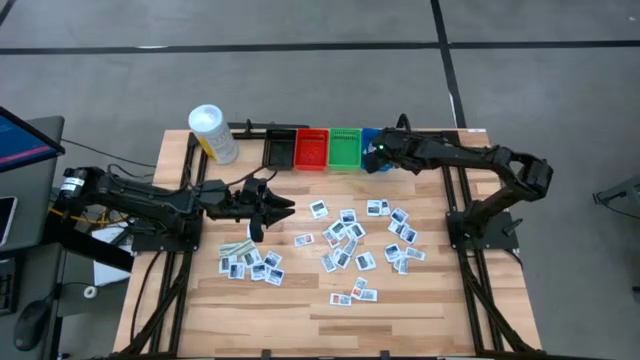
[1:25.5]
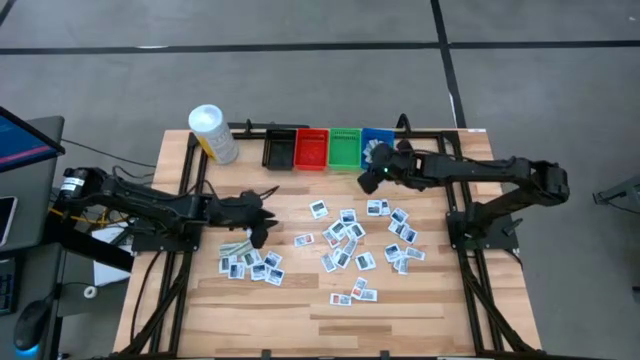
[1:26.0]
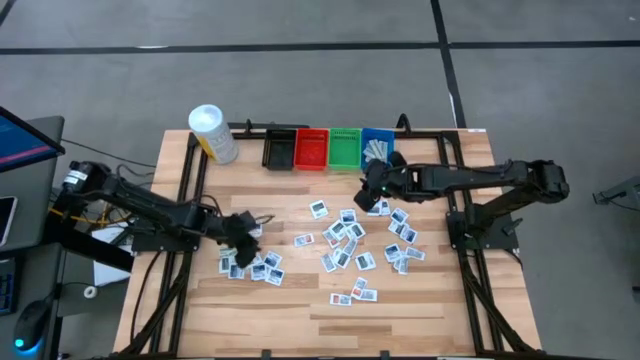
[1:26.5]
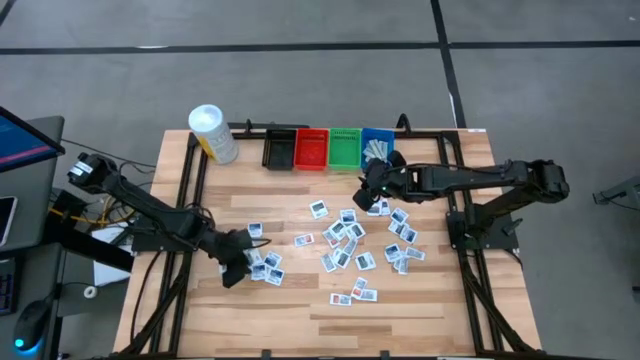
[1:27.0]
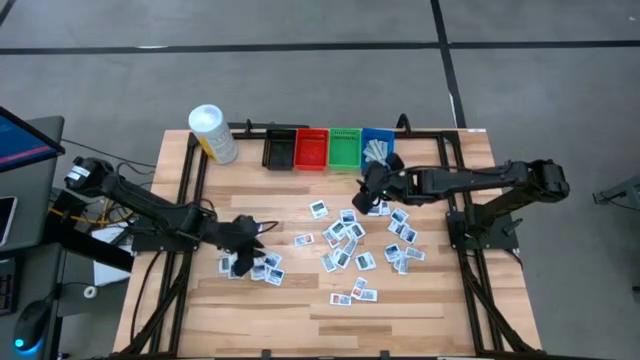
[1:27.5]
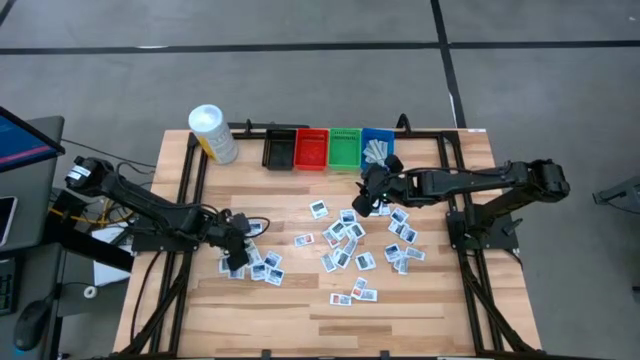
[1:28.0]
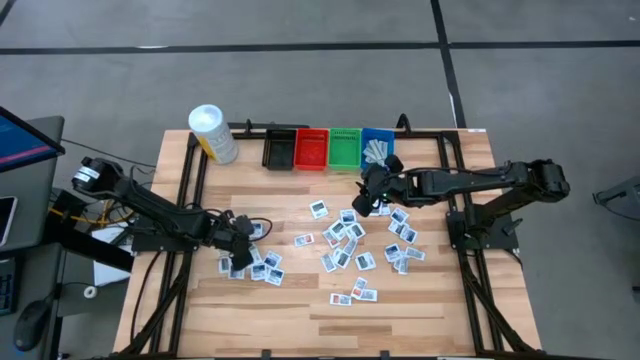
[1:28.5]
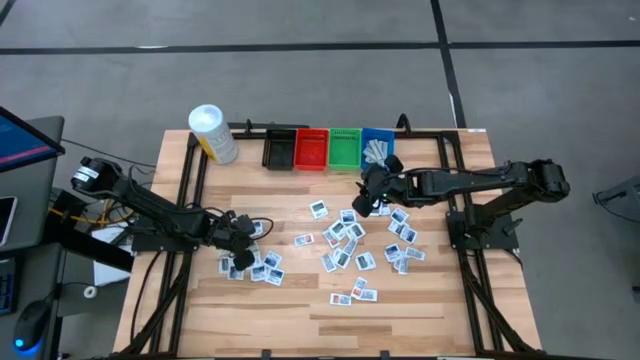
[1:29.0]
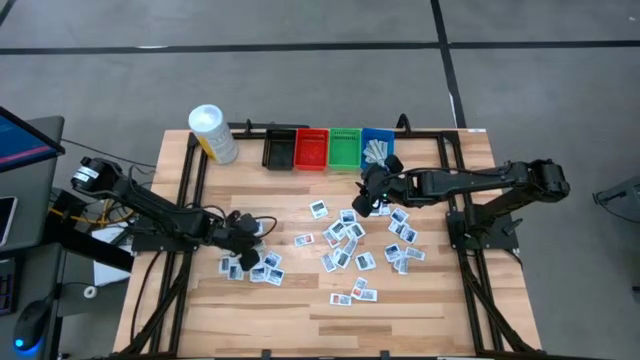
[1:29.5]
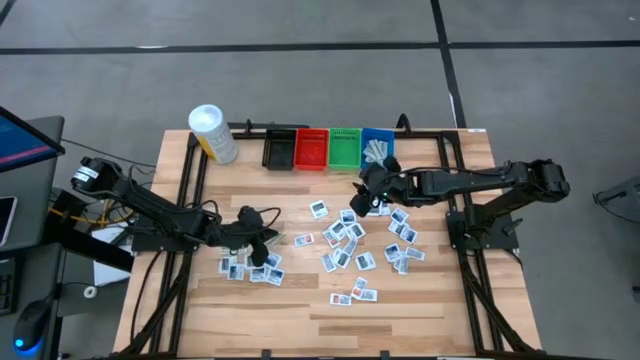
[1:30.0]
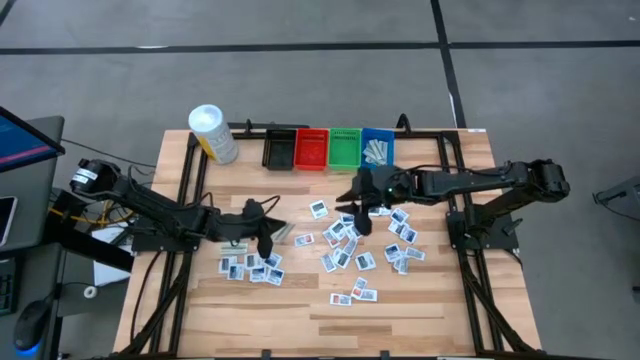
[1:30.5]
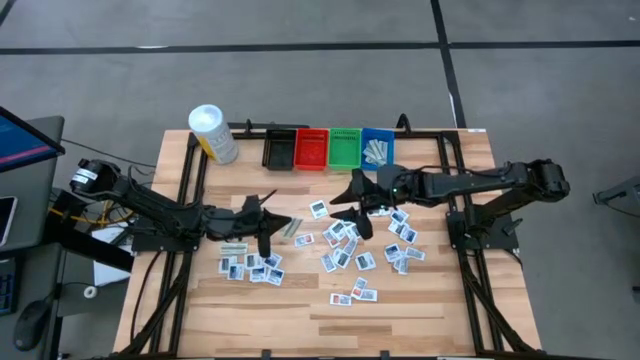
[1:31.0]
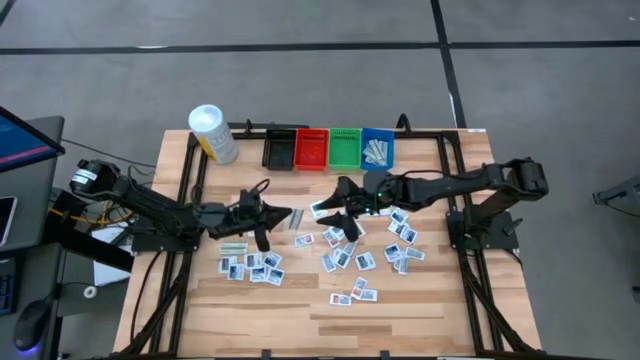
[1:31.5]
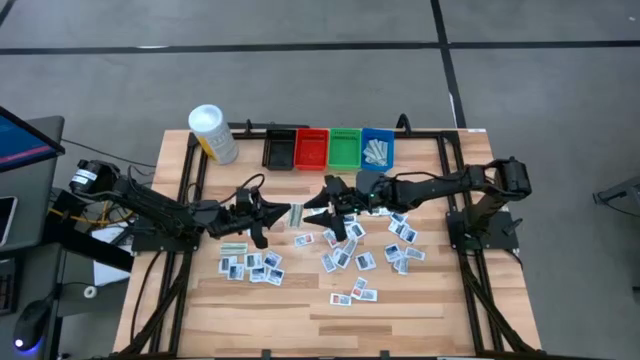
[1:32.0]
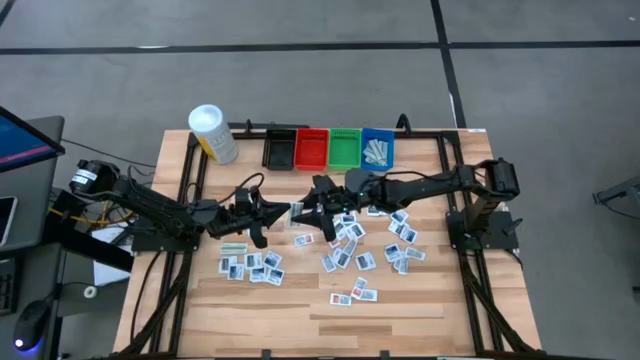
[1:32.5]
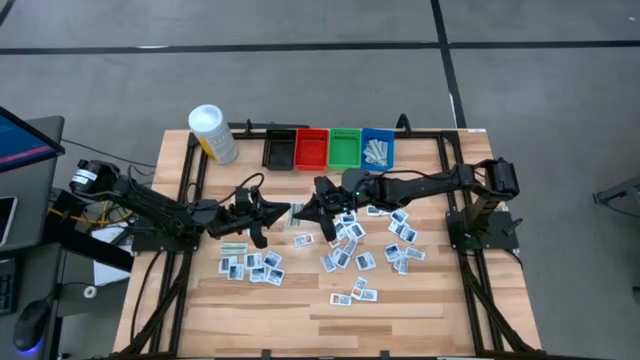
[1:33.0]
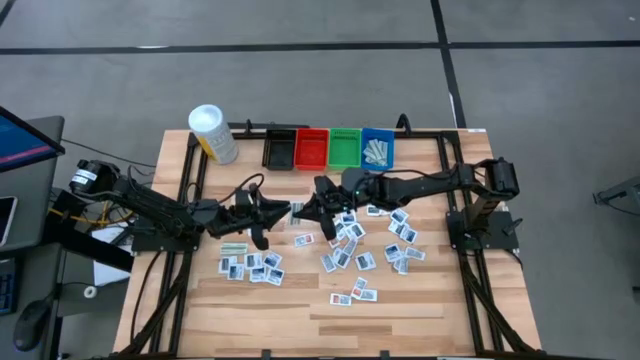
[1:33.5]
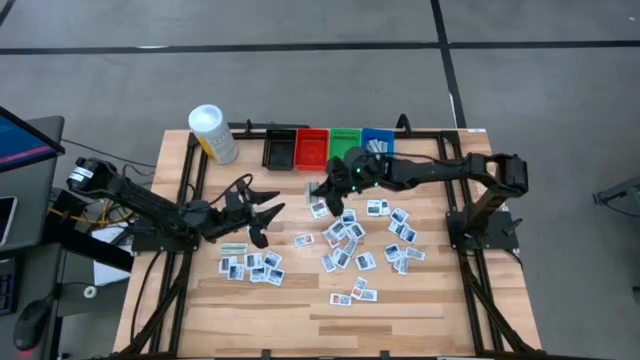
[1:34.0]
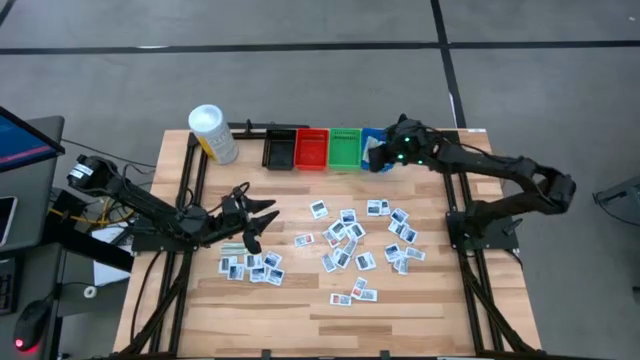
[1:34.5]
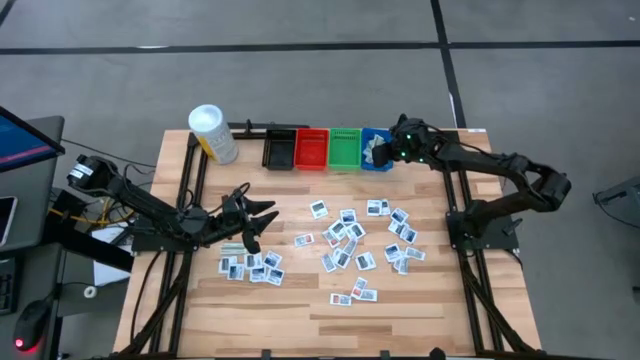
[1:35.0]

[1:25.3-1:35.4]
Task: Pick & Place First Aid Supplies
Put the top bandage pack into the blue bin

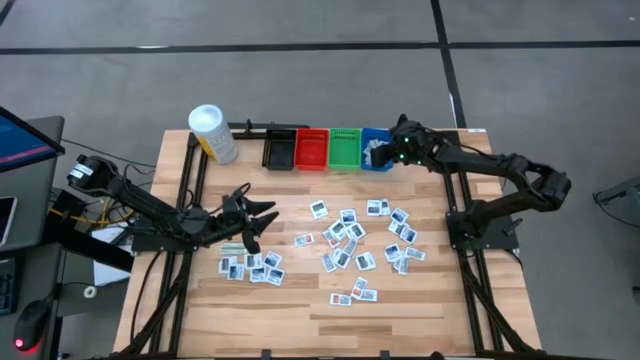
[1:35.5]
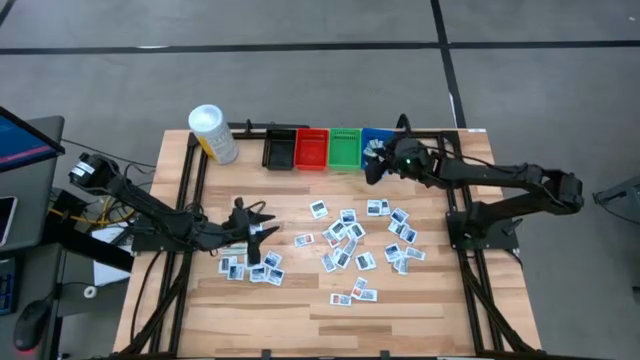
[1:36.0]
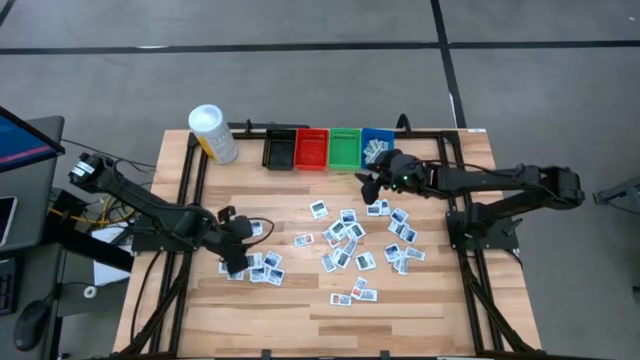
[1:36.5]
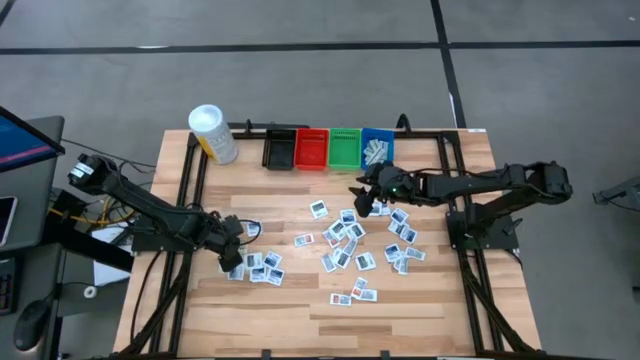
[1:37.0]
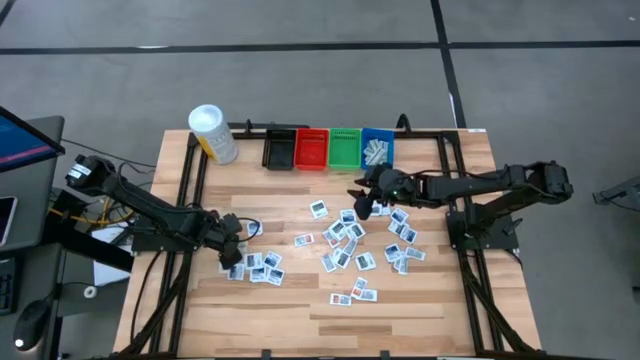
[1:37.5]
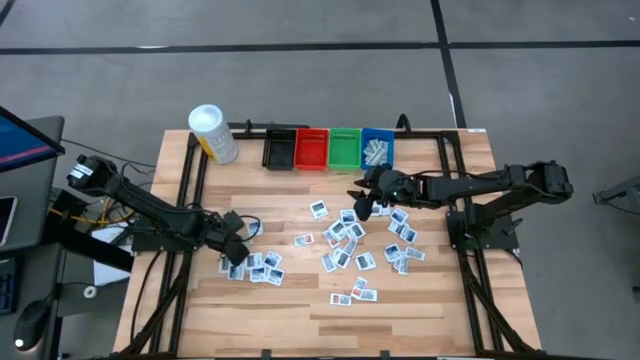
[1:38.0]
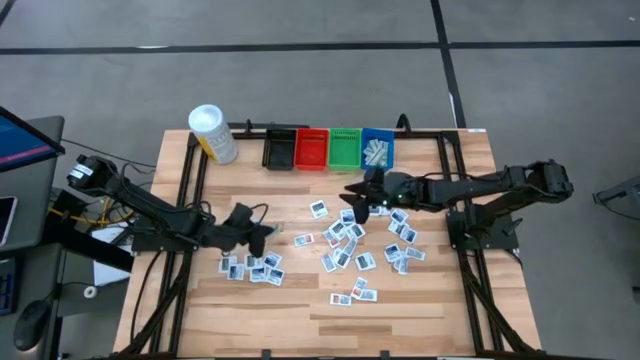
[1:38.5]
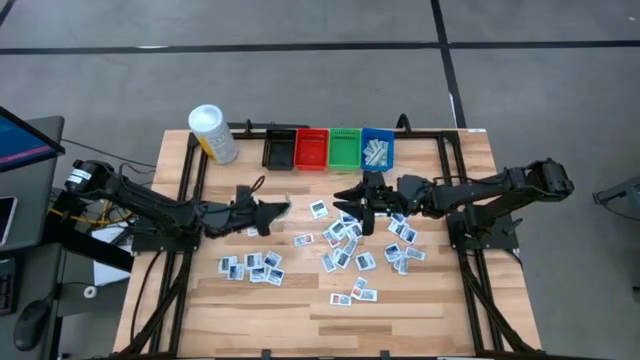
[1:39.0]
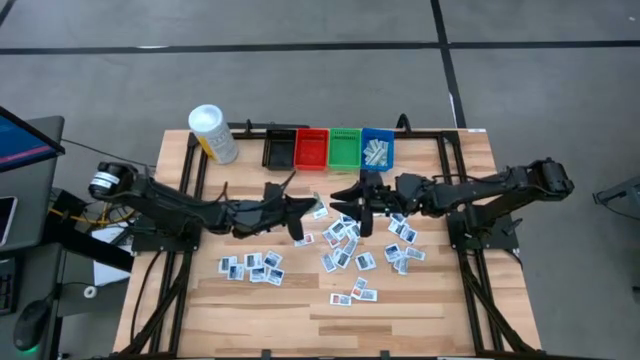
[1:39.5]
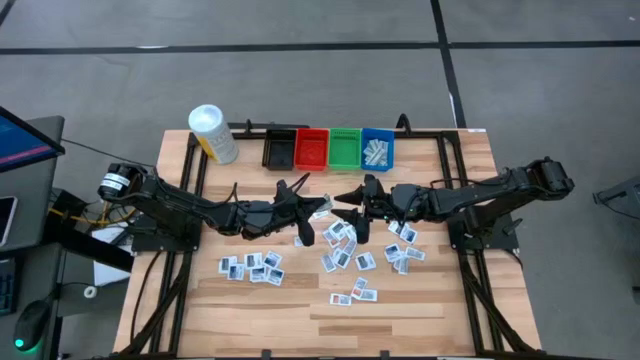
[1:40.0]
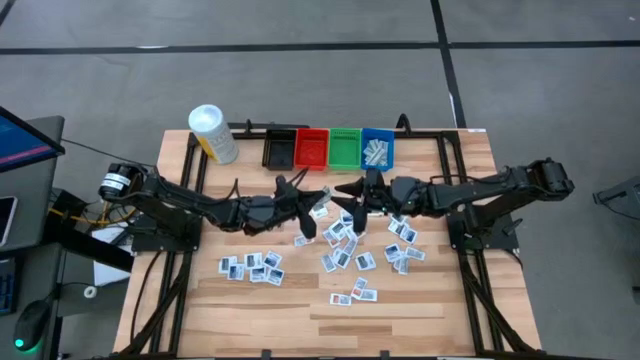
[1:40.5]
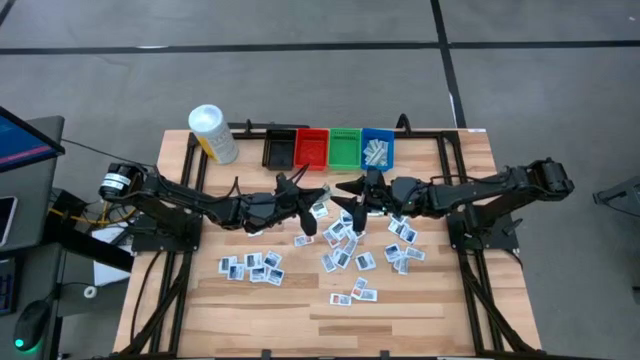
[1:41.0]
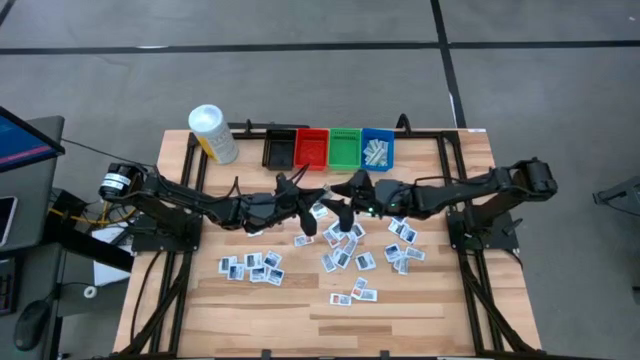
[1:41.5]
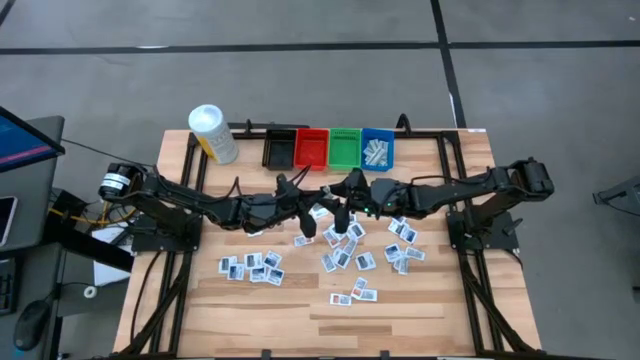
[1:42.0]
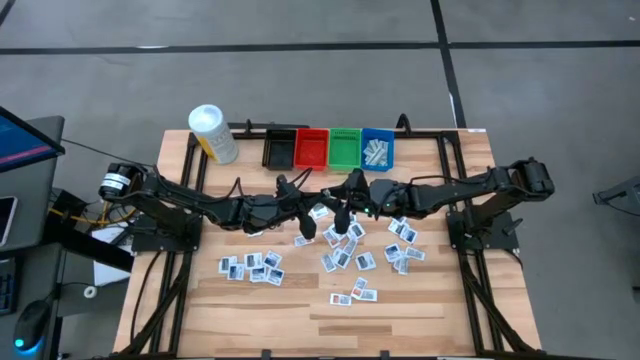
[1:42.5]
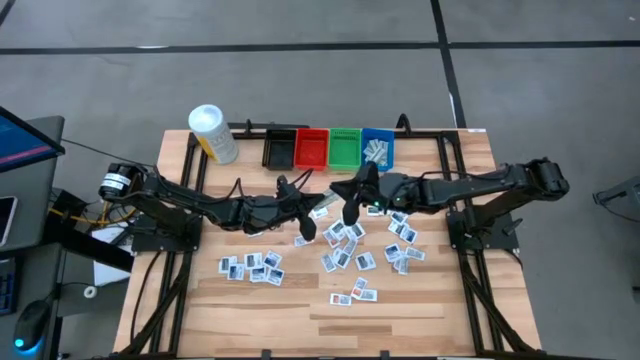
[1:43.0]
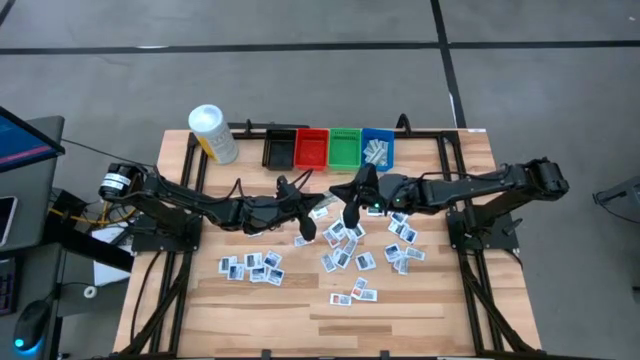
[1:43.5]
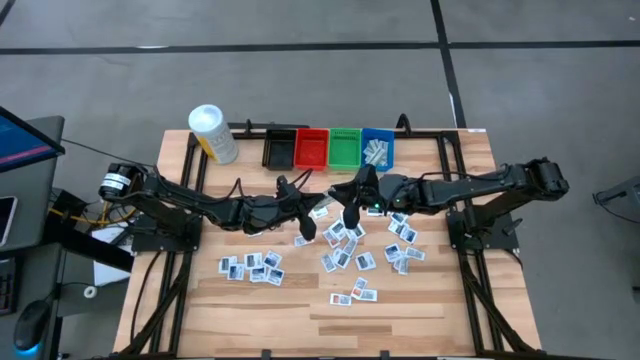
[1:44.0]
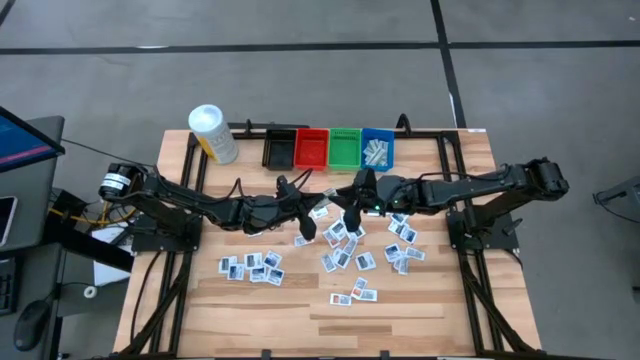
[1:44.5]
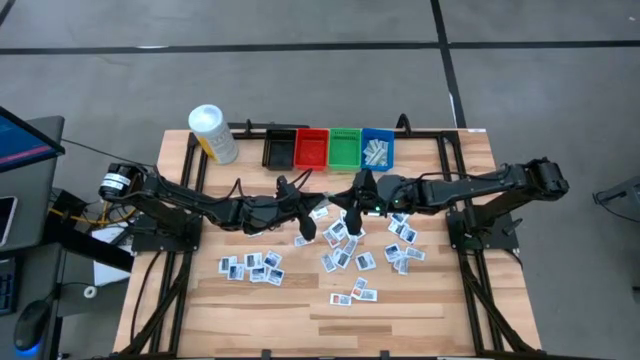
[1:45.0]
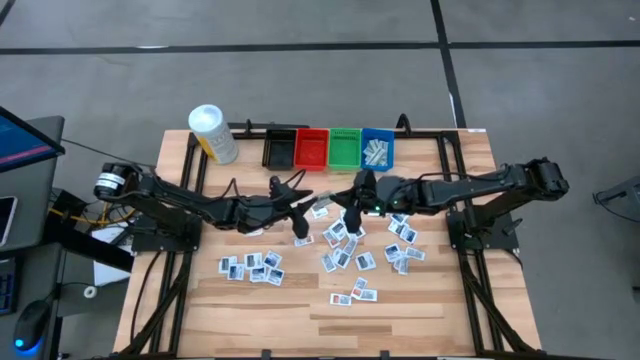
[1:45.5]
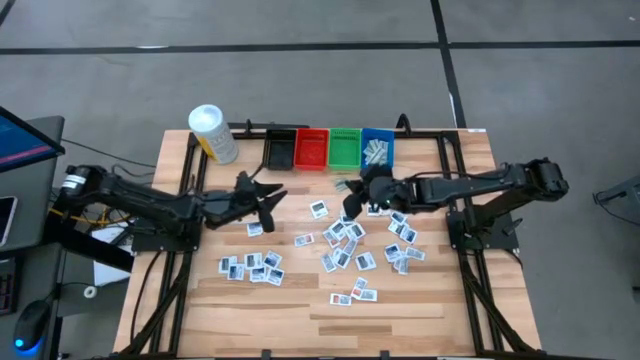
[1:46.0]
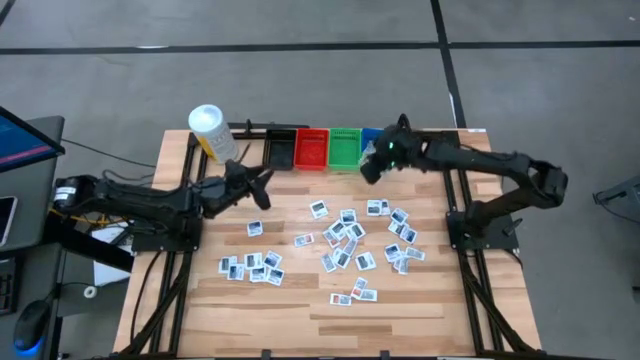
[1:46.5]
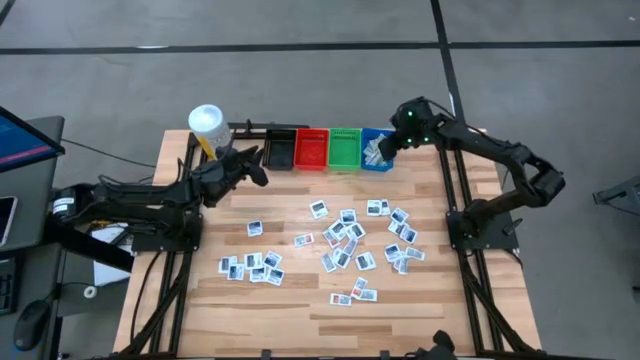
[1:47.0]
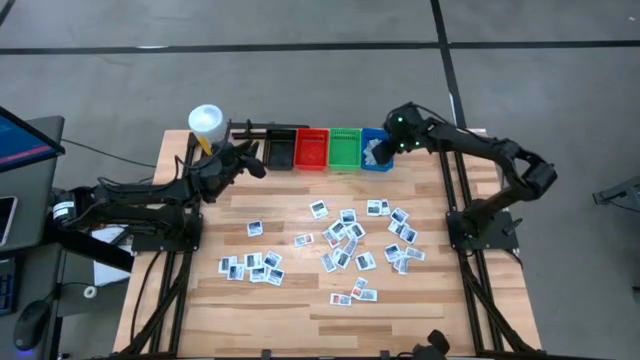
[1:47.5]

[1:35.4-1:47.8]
Put the bandage pack into the blue bin
